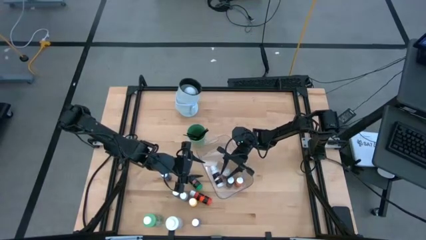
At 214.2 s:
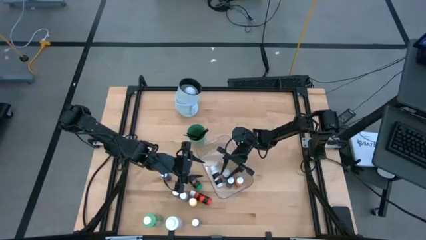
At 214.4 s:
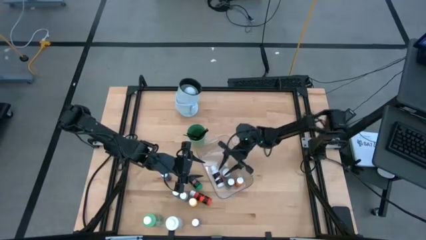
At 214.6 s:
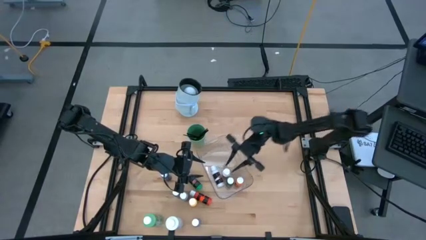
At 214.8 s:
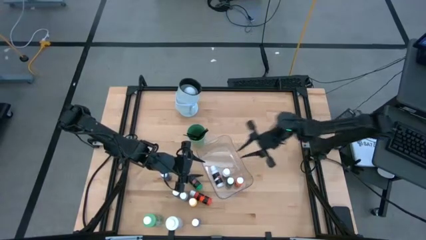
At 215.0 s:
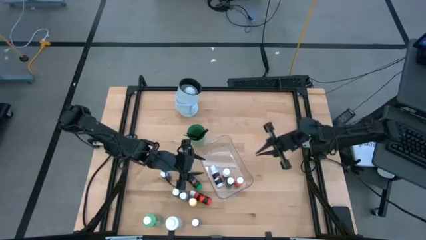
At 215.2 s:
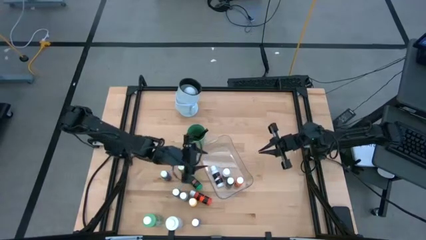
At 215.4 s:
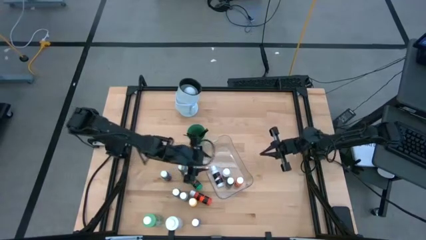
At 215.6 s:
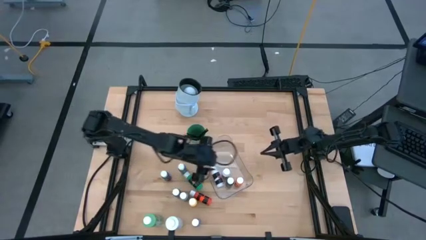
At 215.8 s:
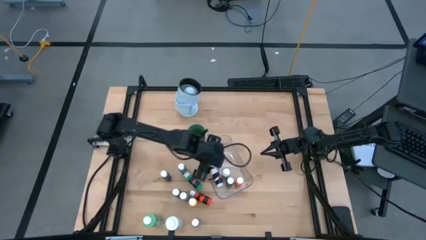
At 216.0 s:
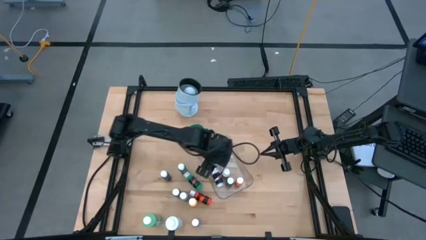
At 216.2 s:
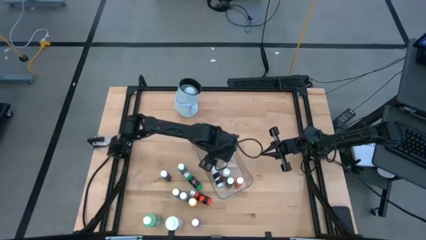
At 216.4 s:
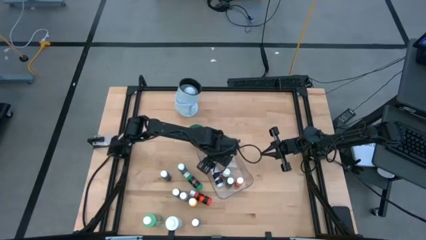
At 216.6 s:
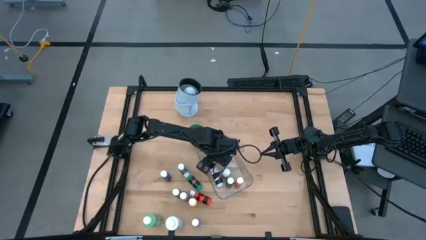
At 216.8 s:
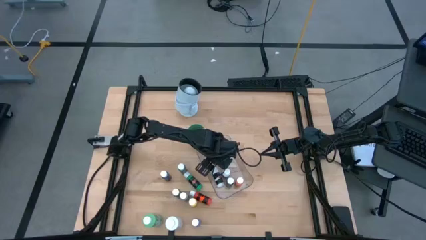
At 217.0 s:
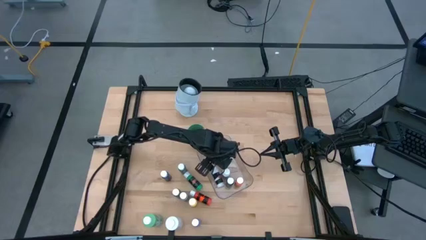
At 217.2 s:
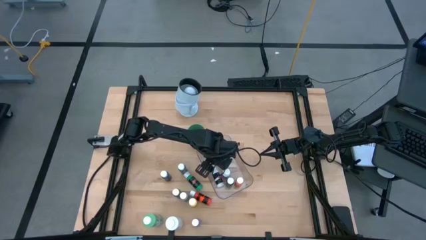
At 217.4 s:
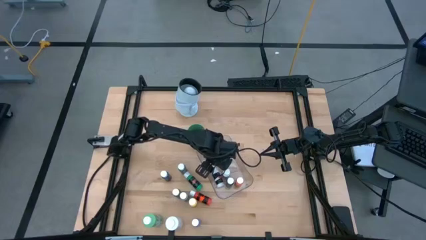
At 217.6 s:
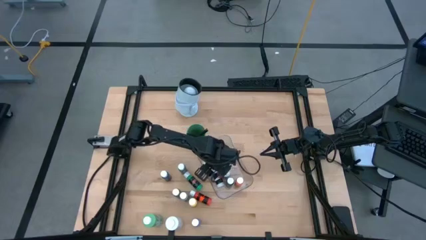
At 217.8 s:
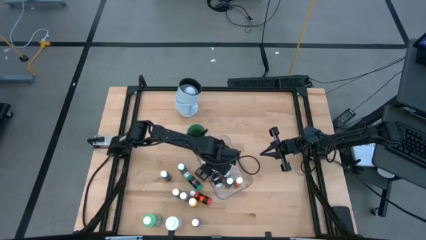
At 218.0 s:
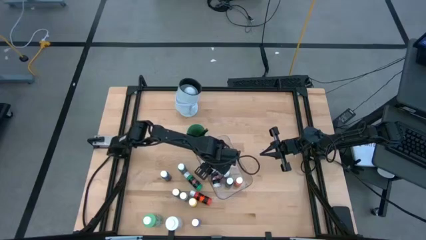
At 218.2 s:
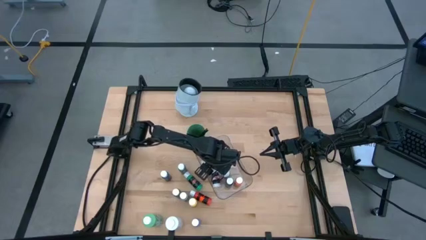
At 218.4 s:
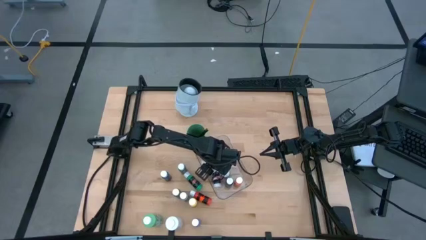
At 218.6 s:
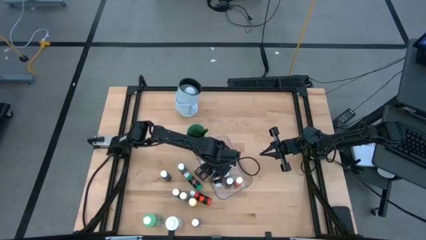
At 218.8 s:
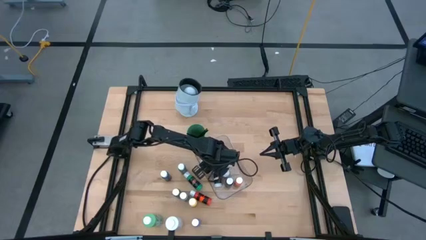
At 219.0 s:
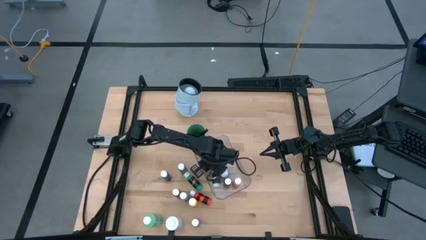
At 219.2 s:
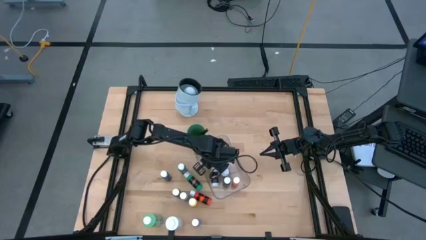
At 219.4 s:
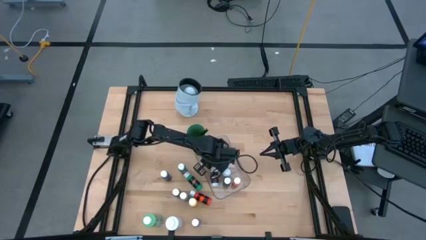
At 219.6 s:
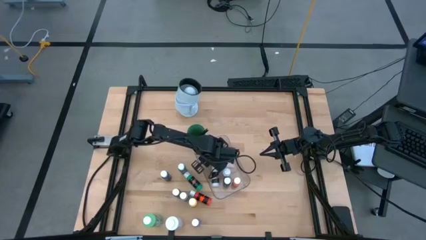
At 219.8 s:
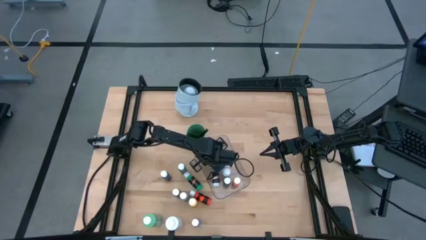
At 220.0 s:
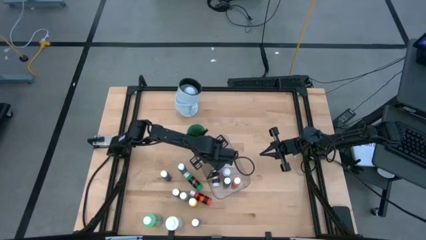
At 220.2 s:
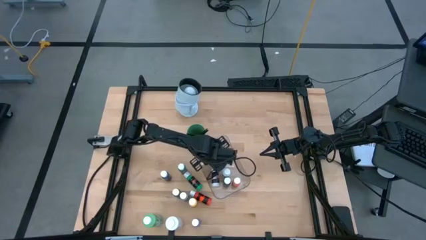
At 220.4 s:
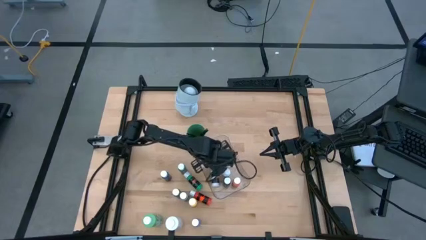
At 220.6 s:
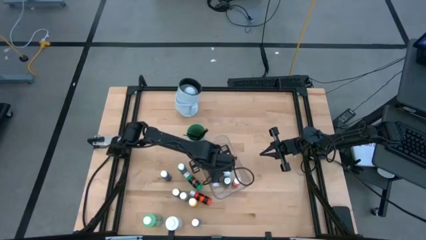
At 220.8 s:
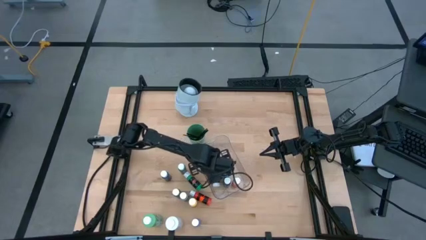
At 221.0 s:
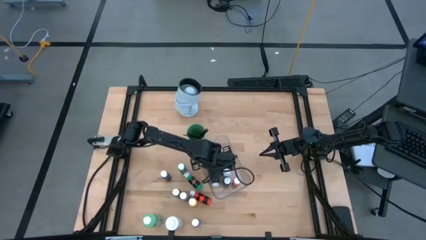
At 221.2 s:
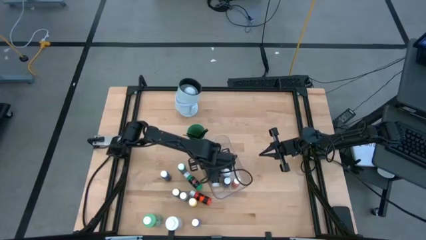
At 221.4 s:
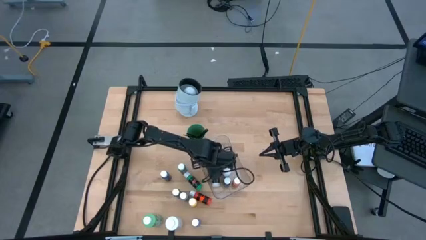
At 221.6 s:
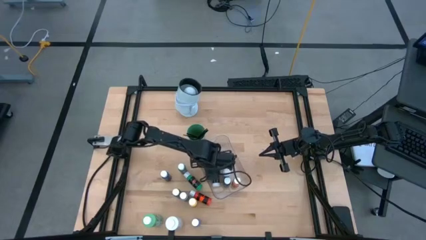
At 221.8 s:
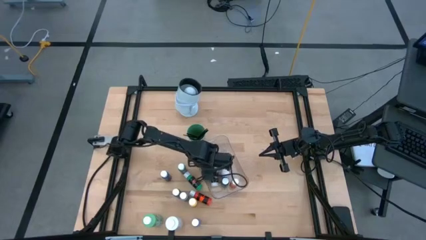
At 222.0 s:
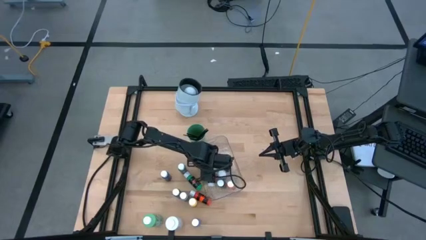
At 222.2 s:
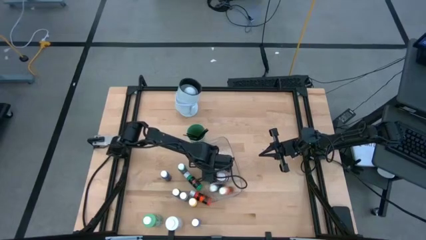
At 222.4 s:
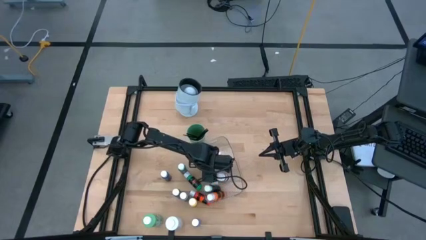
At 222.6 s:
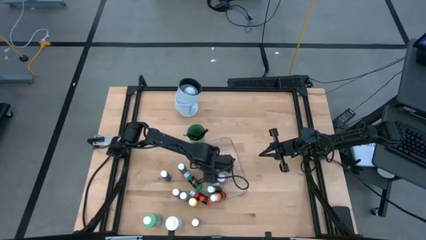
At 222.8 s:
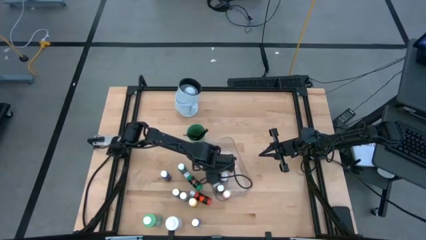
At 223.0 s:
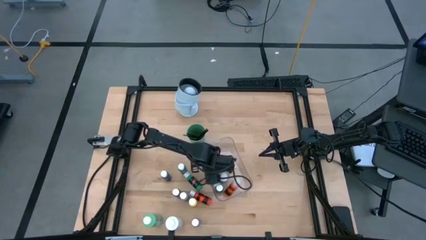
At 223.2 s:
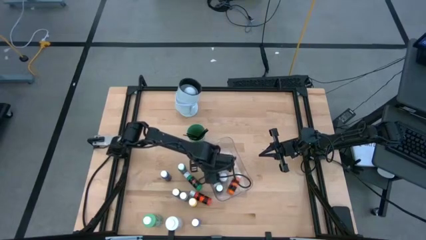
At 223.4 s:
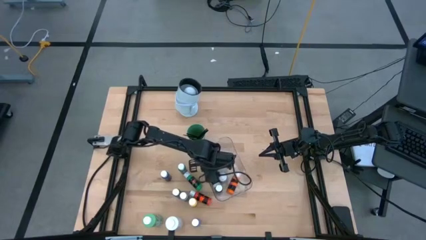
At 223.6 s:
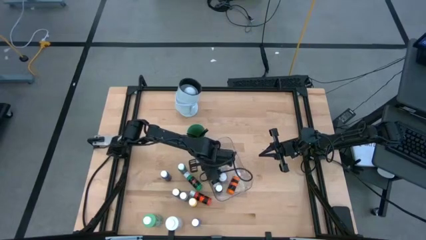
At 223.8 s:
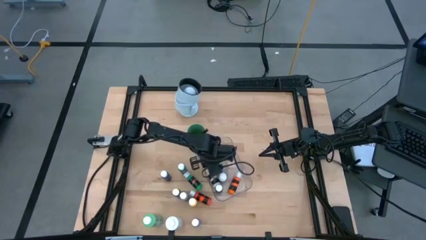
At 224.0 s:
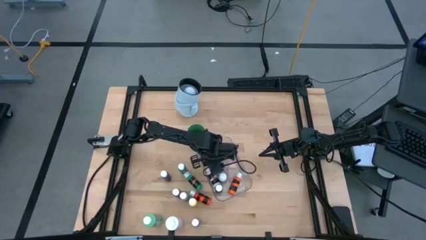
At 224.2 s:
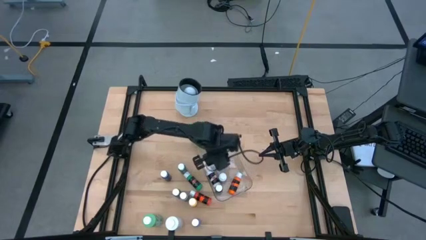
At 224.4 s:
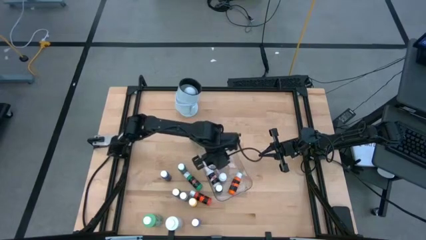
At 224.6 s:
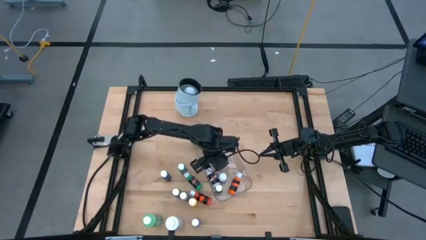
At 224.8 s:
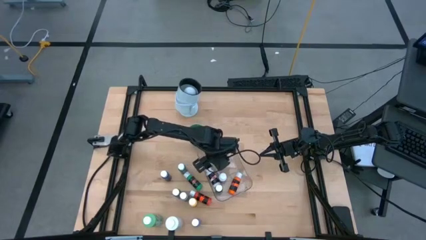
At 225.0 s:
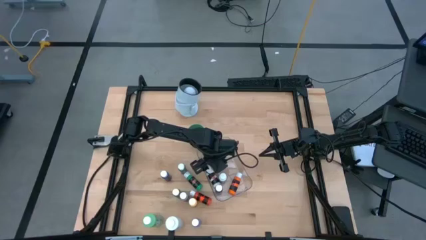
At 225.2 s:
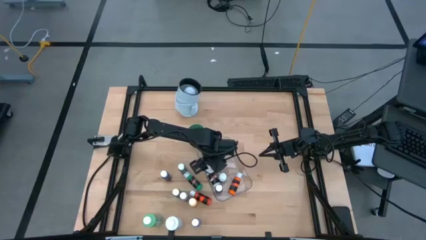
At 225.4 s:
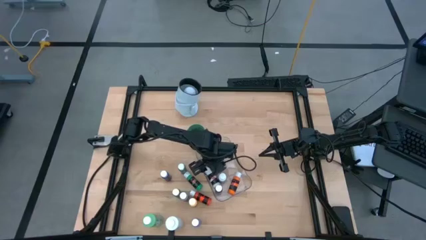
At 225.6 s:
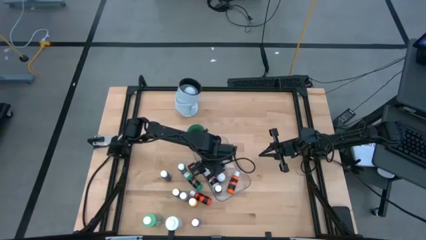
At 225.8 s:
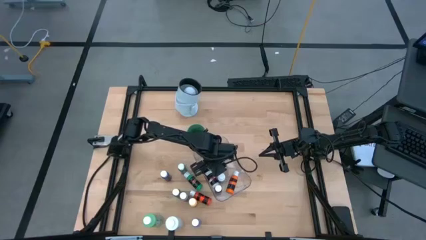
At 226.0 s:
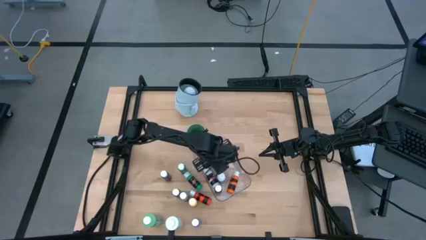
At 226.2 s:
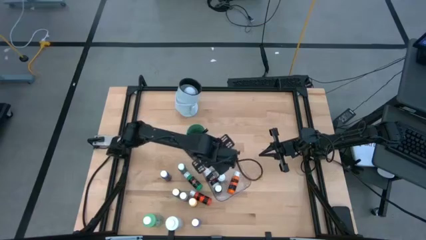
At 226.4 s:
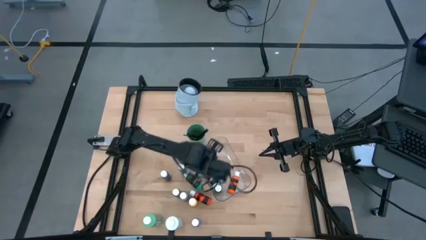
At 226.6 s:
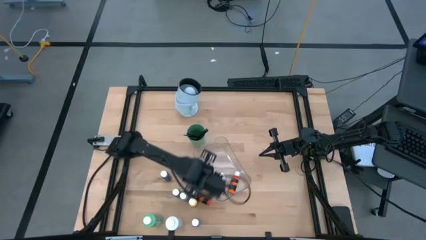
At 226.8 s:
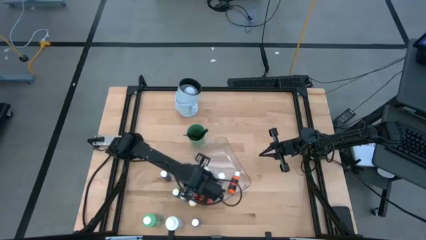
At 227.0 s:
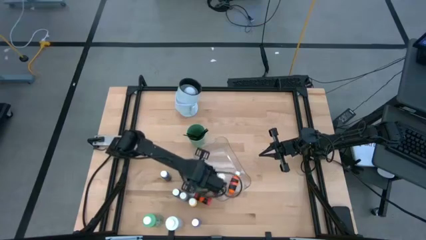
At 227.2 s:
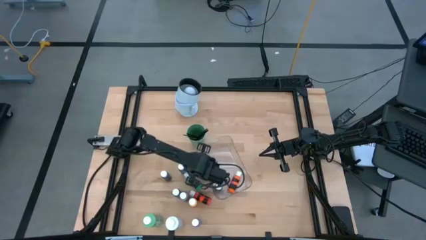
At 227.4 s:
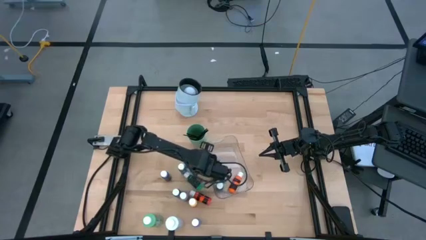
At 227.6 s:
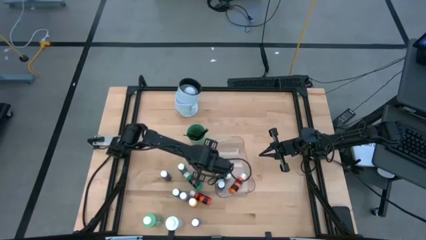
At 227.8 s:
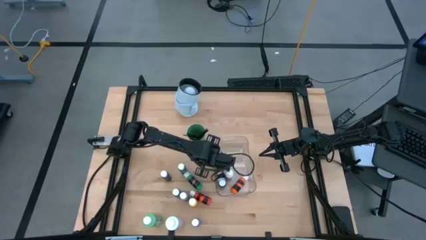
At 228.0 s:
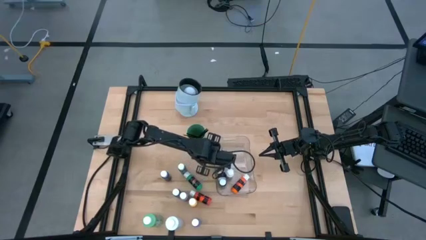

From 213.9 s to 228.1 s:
Task: Pick & Place Paint Supplies
Adjust the transparent bin on the table

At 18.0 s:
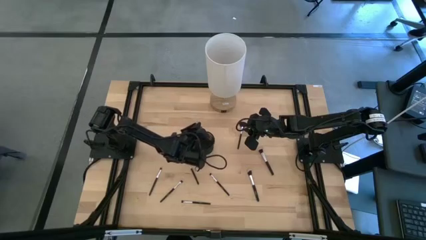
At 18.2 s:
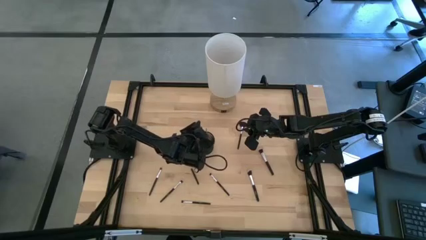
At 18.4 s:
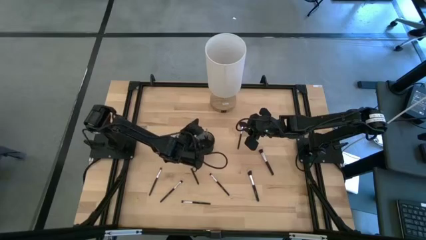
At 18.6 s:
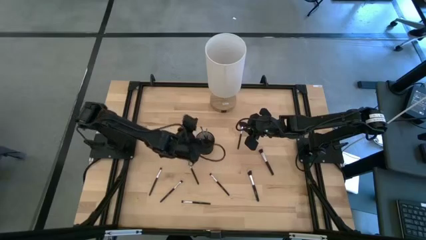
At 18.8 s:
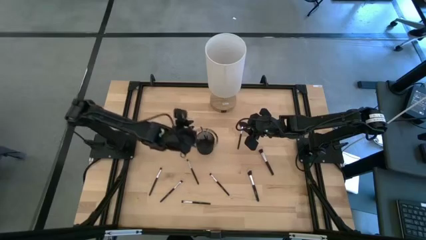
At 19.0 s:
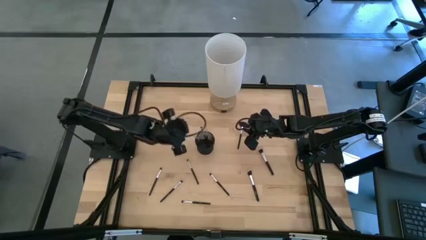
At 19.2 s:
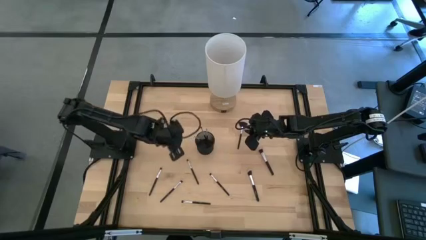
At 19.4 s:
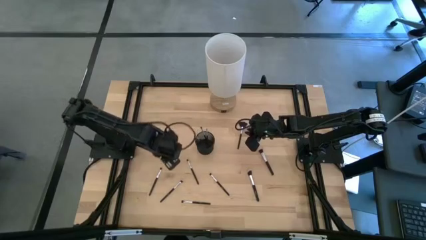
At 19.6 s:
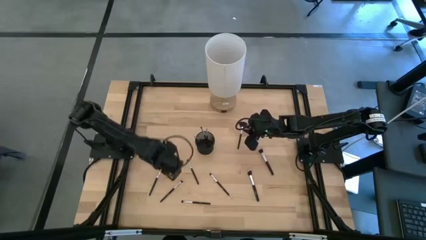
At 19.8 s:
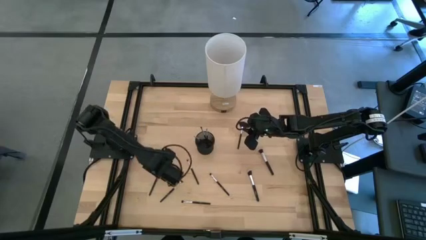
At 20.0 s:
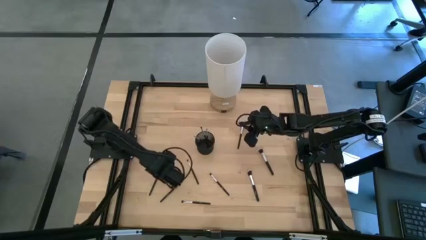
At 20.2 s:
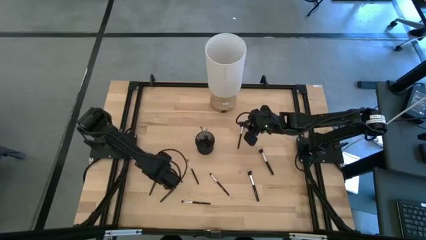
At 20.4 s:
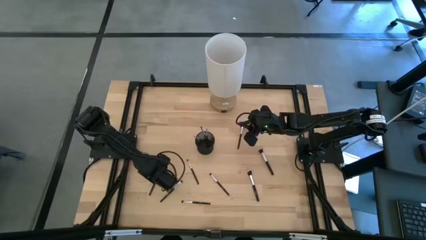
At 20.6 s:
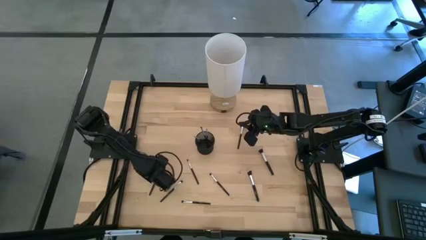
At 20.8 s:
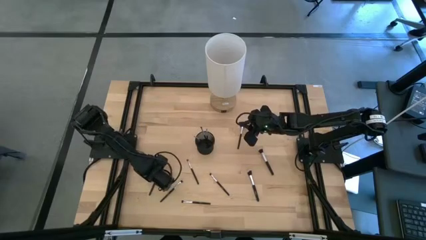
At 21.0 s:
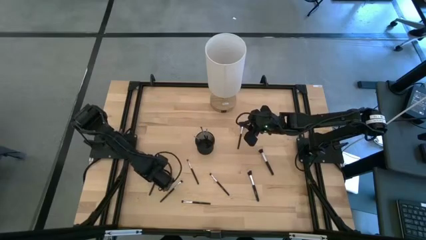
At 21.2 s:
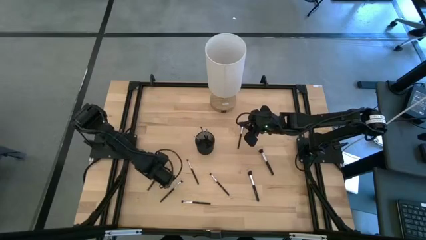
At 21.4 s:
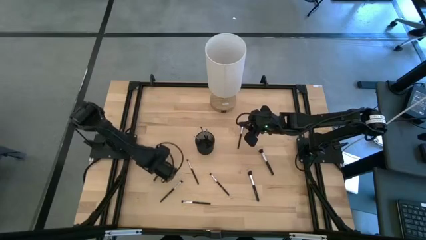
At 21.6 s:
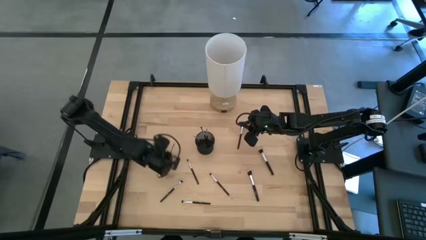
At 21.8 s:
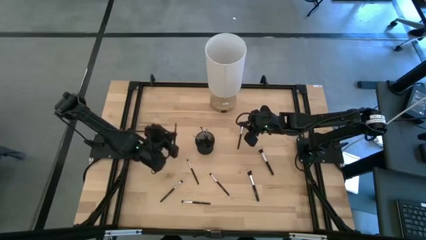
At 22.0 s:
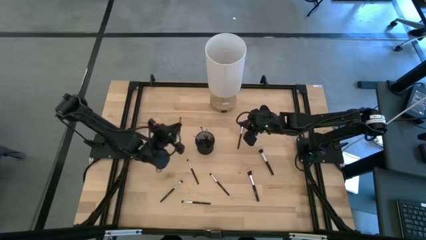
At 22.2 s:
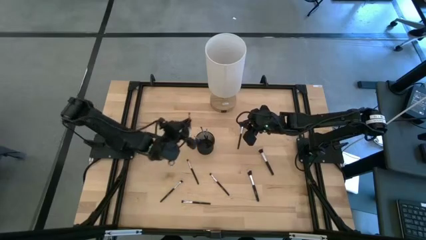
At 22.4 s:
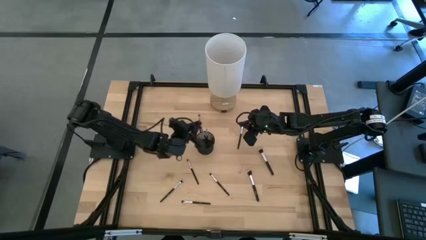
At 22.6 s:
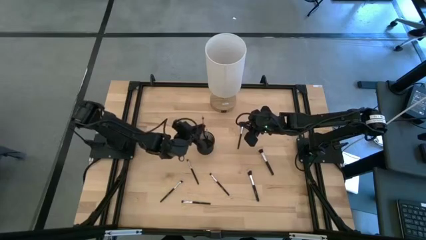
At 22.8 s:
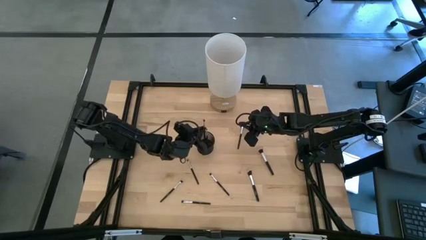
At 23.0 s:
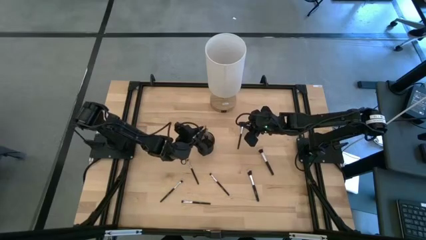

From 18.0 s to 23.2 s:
Task: Put items in baskets/containers
Put the eyeshadow brush into the holder
